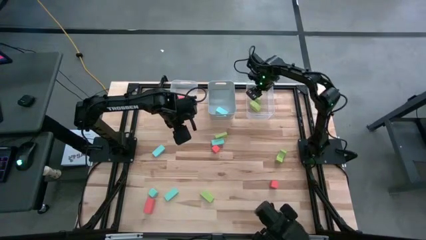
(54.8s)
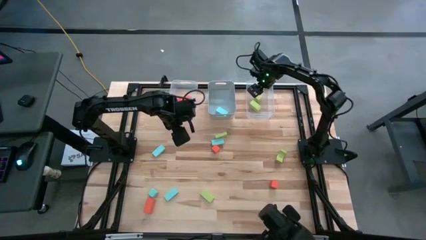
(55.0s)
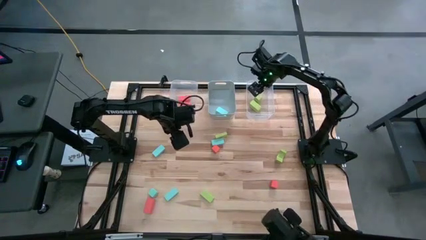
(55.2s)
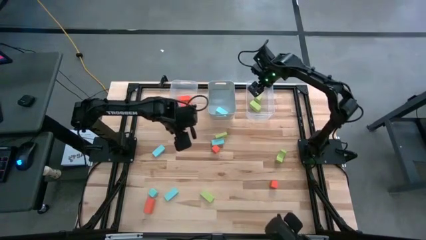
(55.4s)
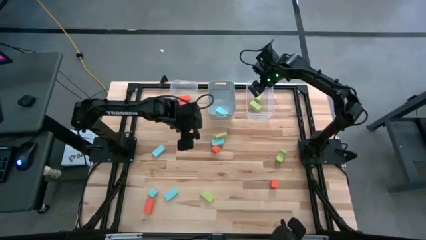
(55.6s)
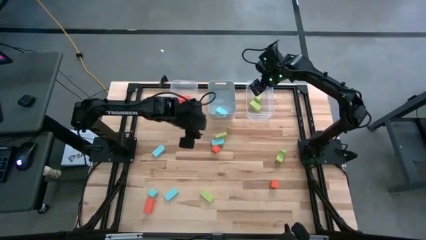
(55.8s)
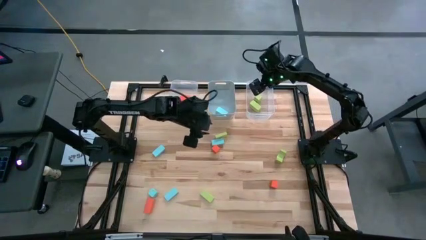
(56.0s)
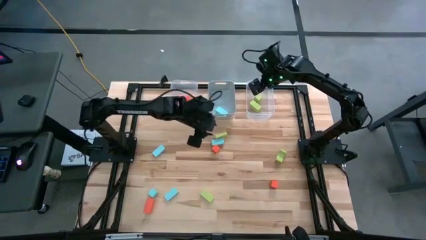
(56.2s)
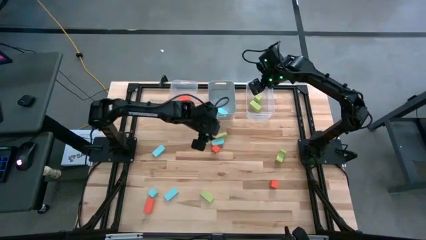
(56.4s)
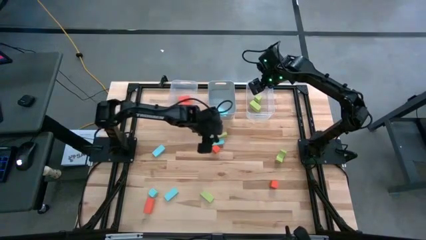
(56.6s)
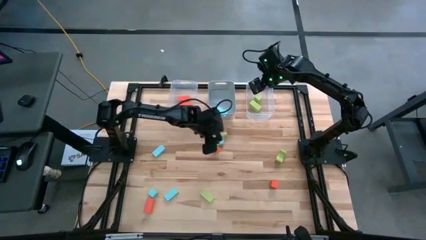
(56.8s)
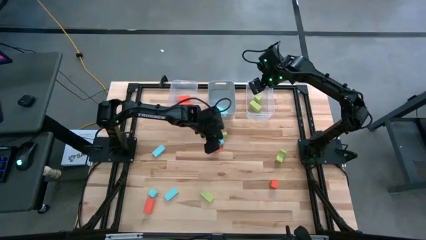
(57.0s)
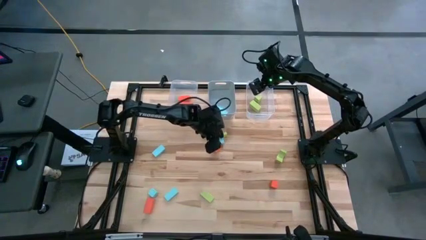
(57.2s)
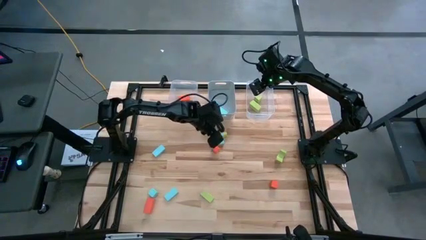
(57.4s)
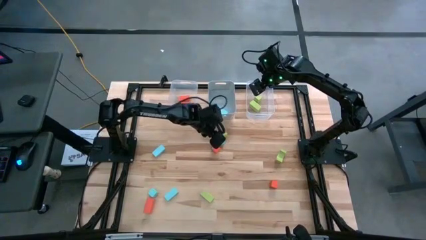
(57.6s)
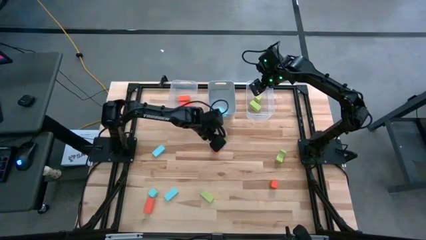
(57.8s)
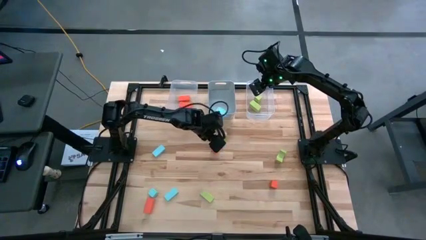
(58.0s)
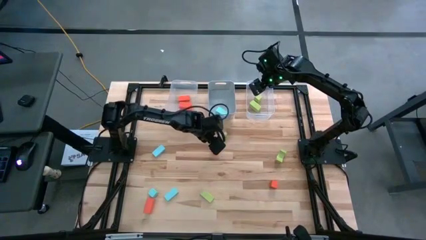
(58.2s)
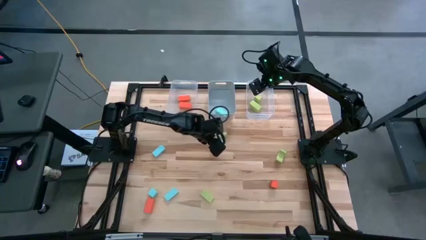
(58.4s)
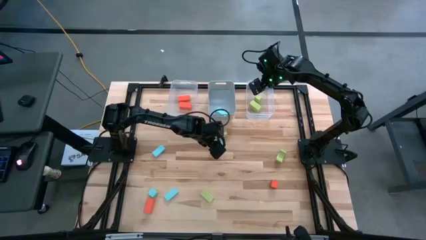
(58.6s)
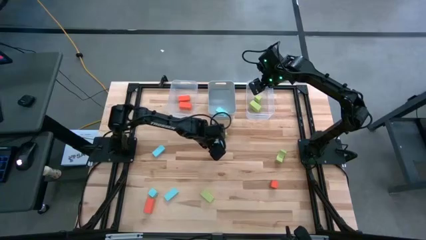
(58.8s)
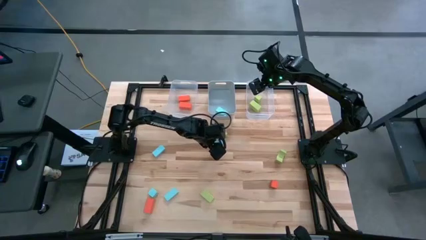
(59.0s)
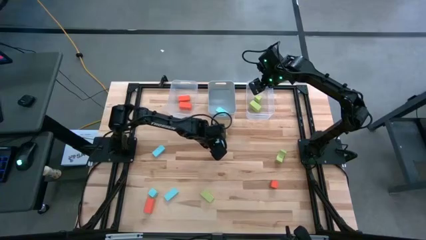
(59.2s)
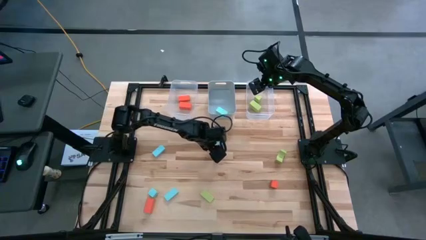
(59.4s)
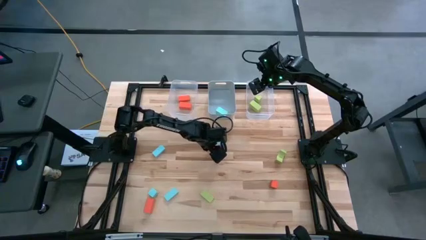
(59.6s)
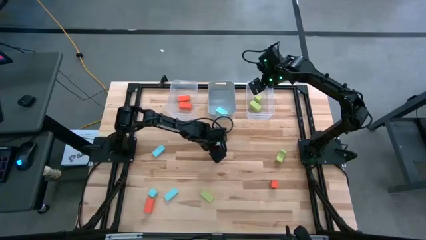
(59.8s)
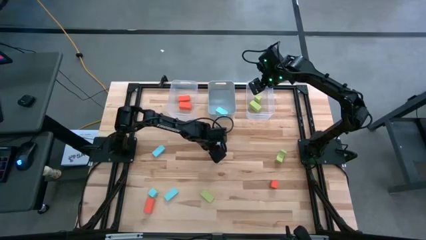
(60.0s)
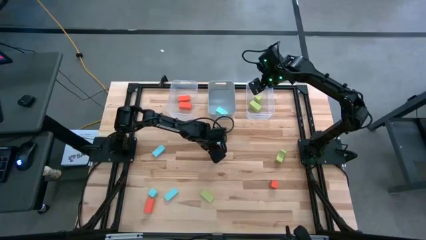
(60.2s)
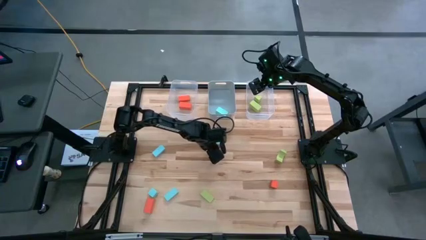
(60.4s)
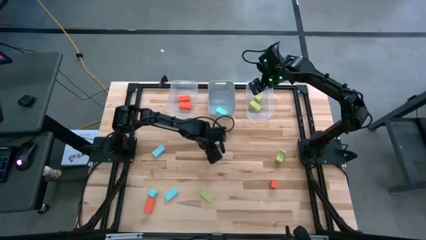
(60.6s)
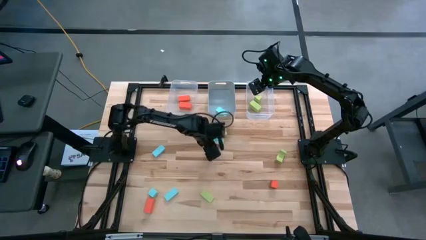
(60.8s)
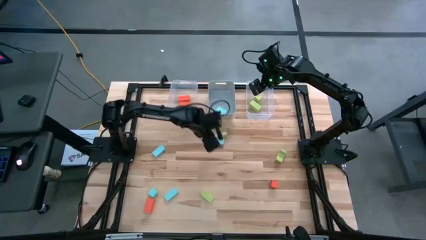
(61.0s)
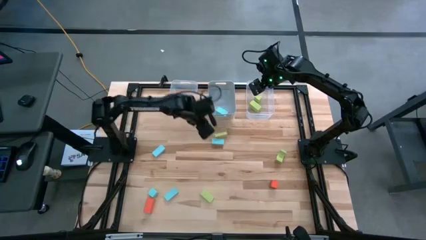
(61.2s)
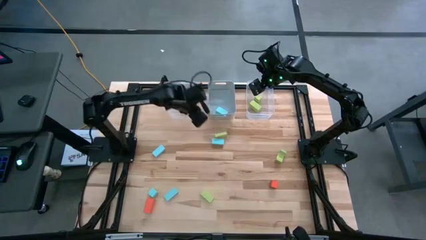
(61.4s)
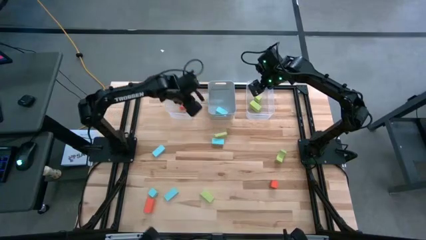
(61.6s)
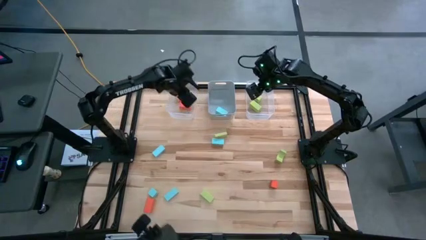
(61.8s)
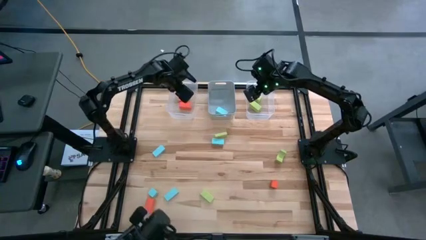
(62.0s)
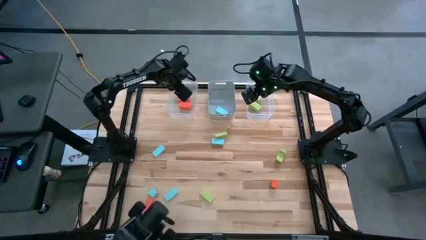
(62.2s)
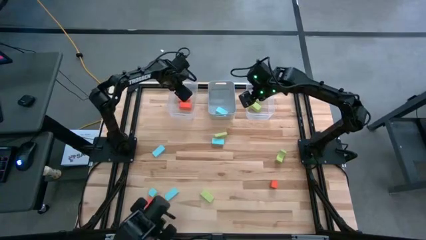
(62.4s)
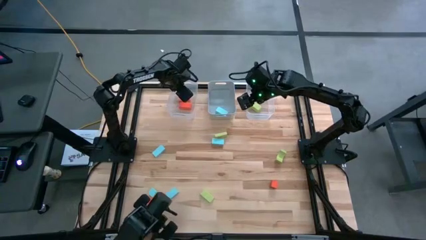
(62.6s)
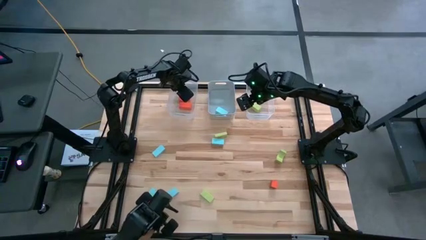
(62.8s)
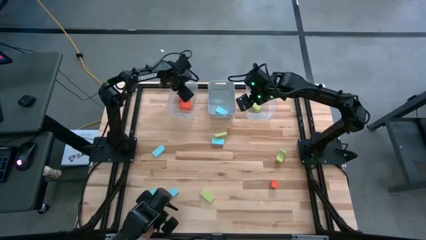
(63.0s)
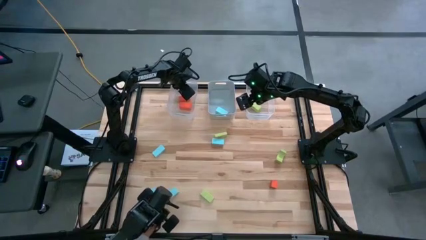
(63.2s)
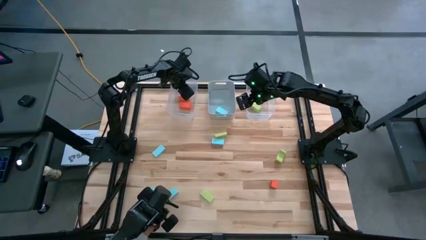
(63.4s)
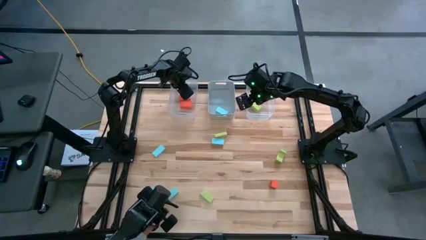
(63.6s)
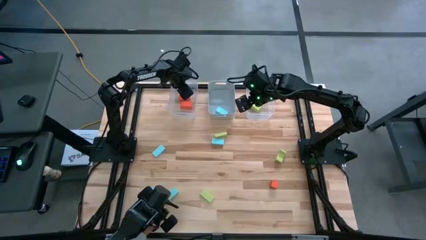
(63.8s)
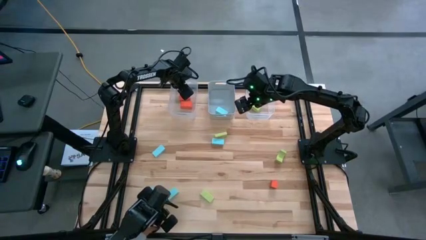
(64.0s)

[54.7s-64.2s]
Task: Sort & place blocks by color
Put the orange block into the left transparent bin

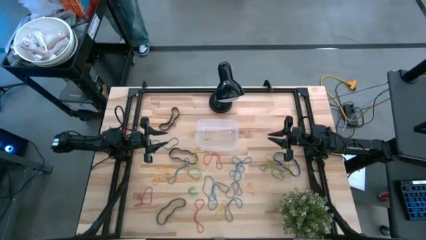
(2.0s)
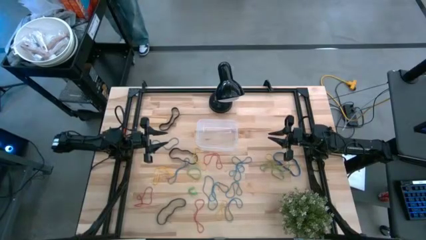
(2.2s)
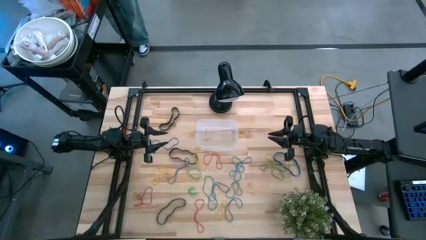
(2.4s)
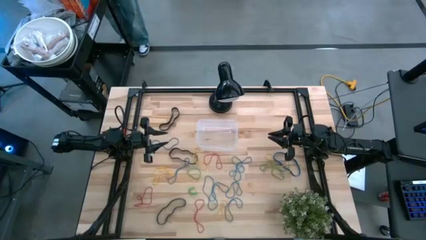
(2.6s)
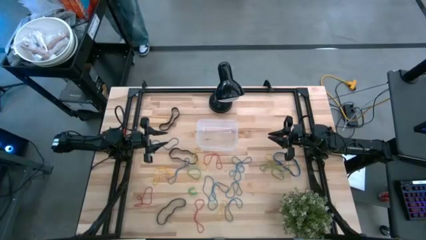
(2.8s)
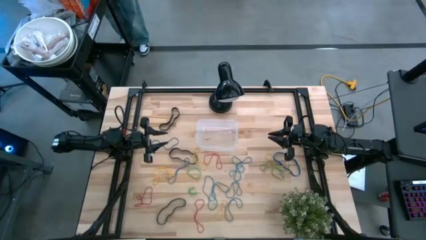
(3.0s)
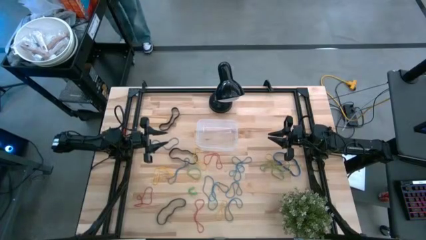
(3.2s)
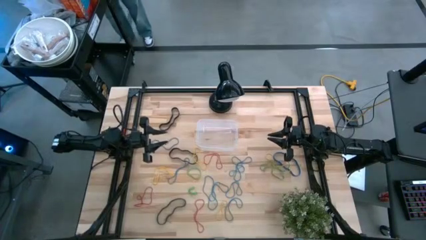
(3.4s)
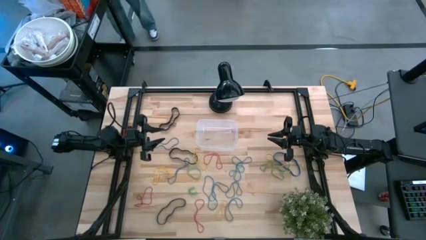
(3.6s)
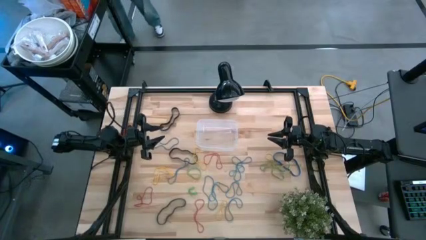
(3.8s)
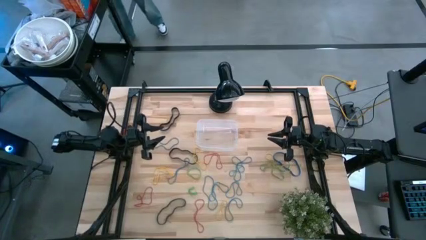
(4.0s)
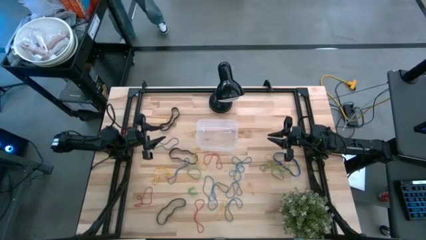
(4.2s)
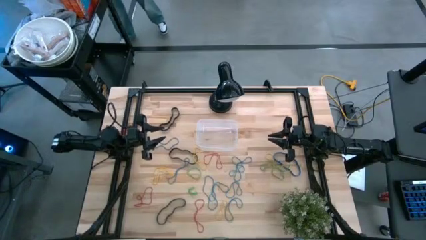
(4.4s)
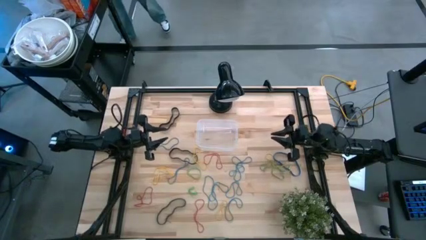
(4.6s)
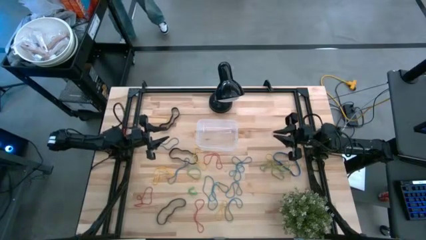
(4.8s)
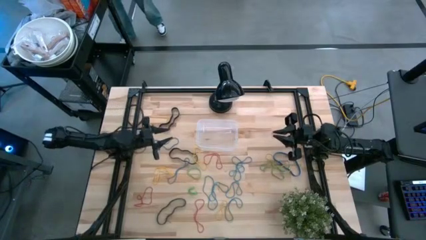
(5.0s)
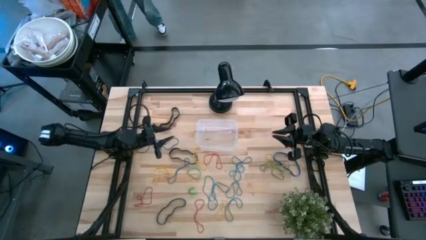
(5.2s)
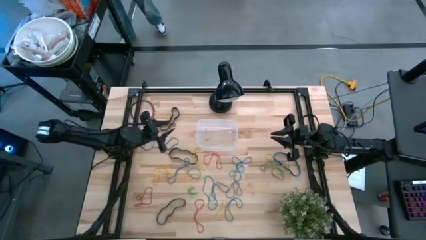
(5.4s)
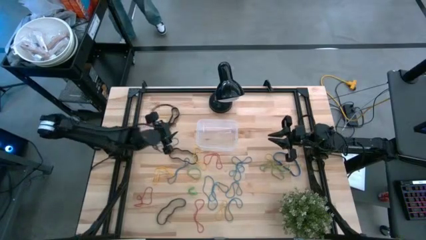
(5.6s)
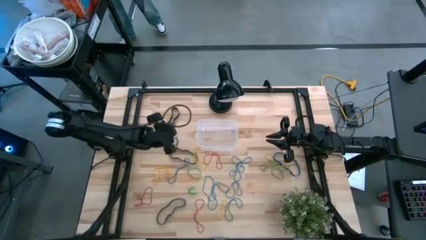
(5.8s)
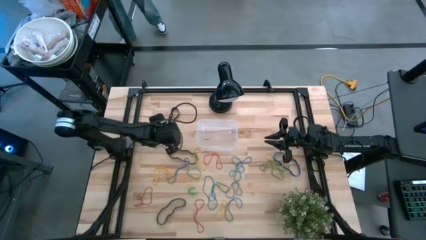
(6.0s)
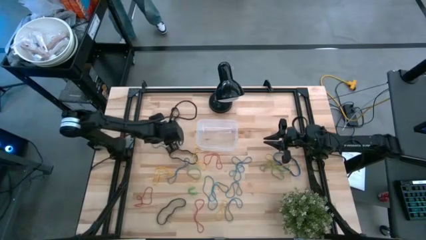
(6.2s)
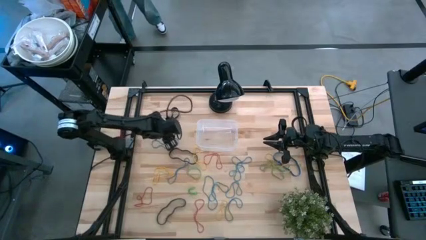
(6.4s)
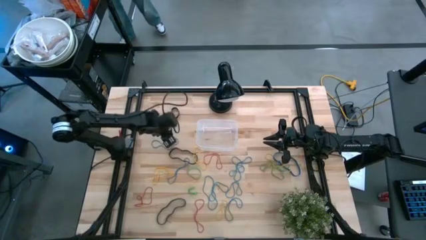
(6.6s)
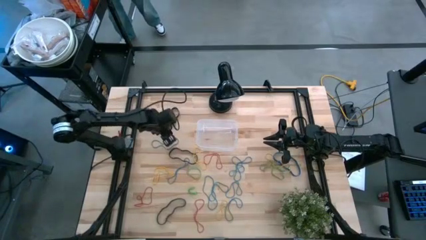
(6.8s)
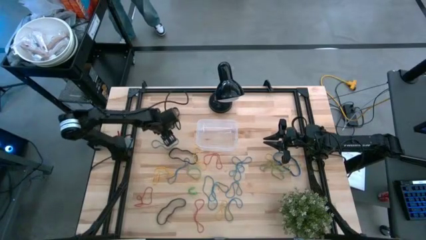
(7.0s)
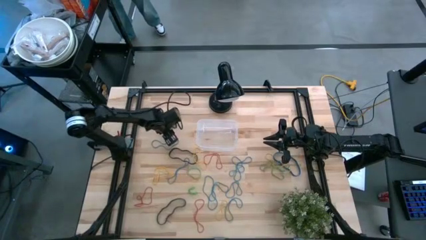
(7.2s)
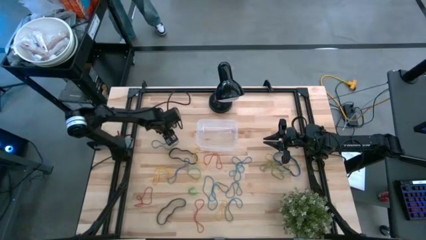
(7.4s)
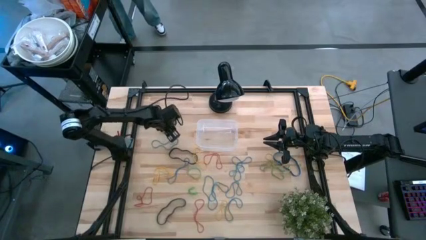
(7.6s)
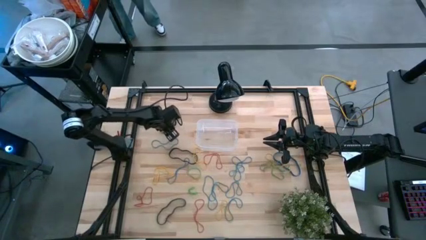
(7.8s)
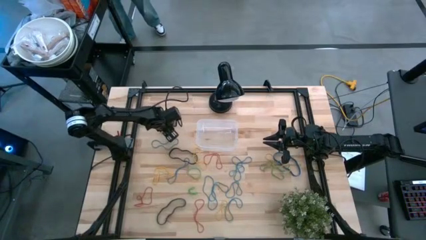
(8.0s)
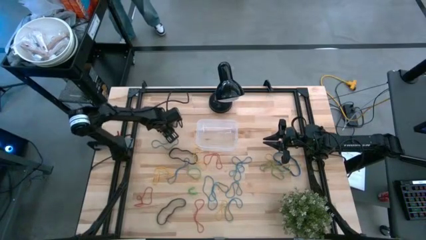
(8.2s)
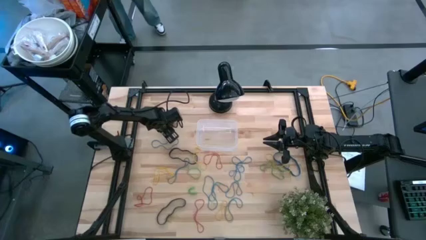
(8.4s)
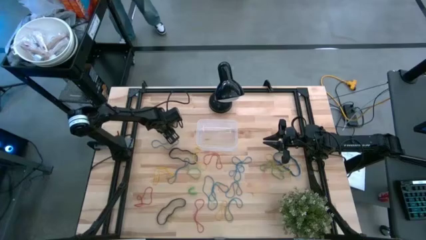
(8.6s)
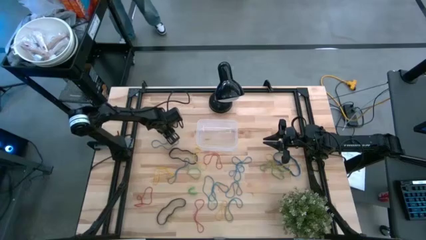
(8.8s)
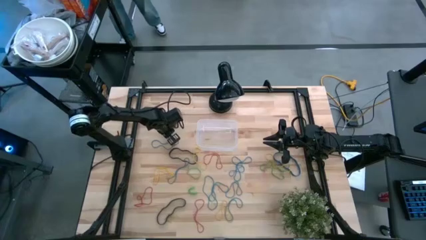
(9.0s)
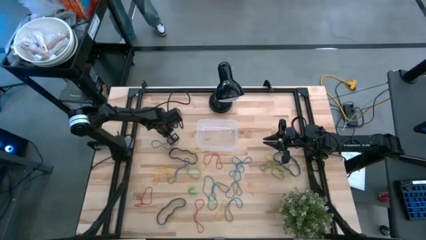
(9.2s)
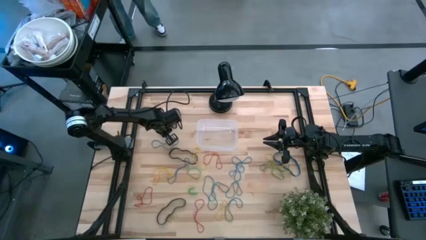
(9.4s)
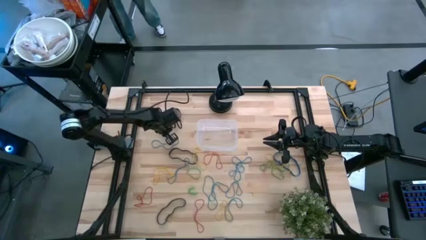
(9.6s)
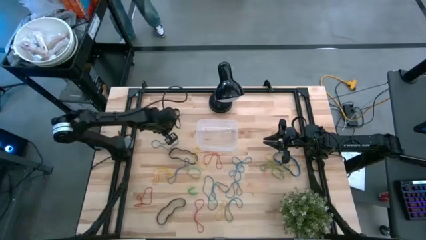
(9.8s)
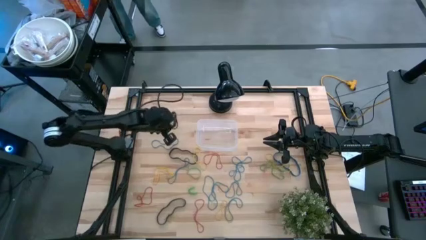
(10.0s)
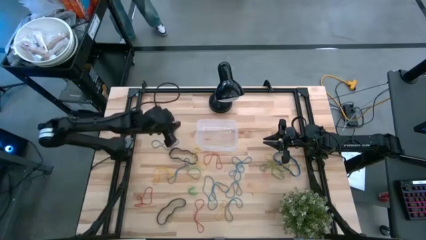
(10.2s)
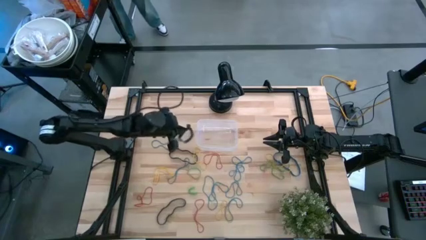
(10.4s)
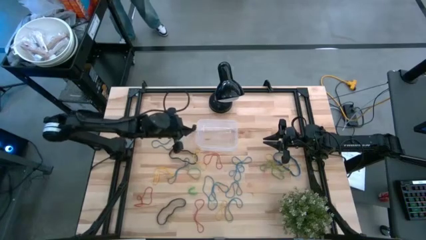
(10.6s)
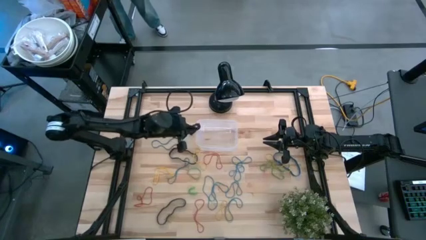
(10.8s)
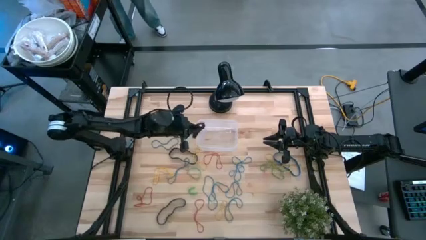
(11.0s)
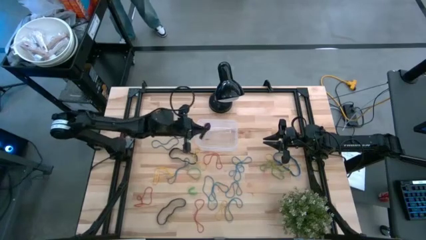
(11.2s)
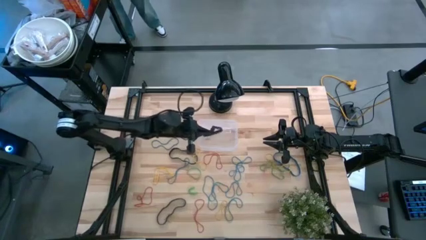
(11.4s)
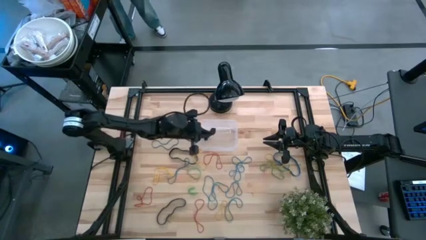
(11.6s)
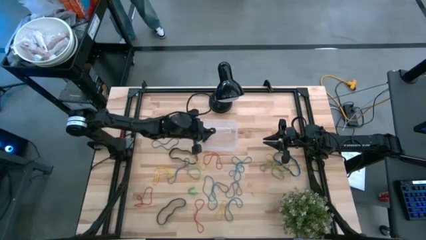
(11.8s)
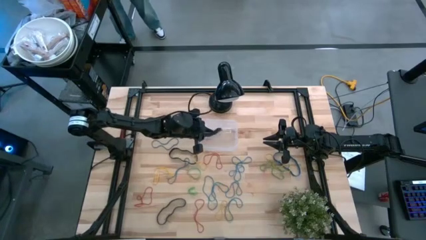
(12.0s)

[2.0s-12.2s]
Task: Pick and place rubber bands into bin
Put the black rubber band into the transparent bin
